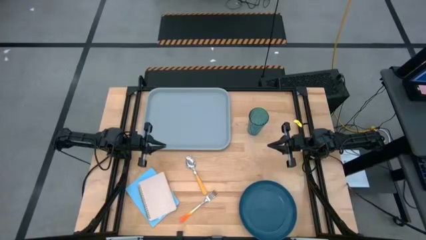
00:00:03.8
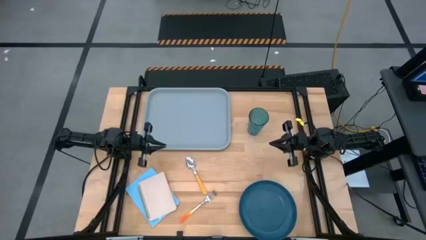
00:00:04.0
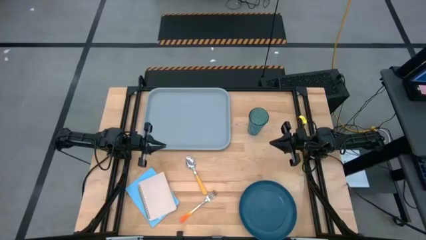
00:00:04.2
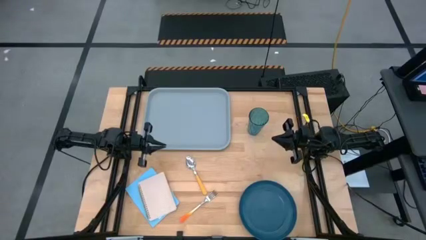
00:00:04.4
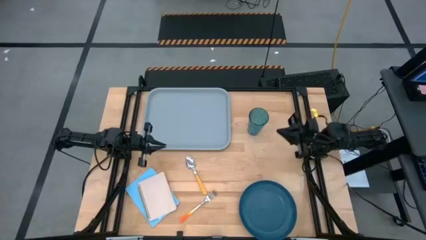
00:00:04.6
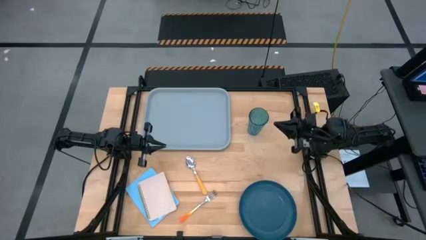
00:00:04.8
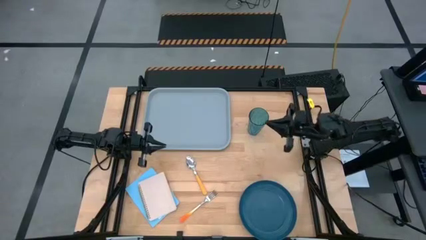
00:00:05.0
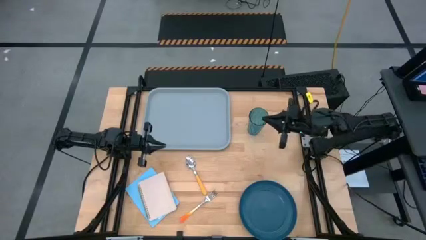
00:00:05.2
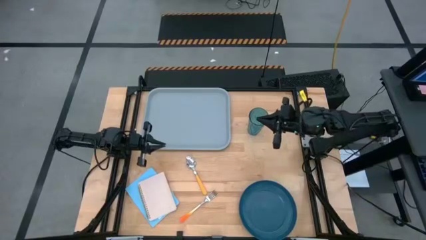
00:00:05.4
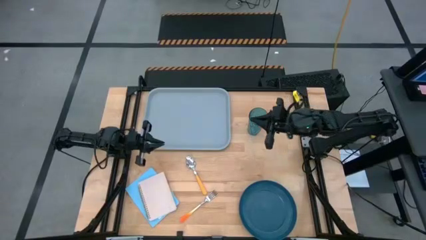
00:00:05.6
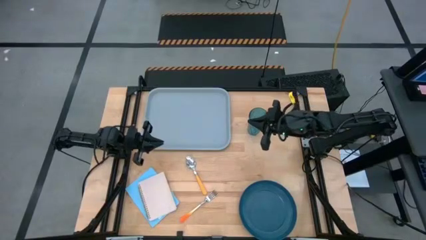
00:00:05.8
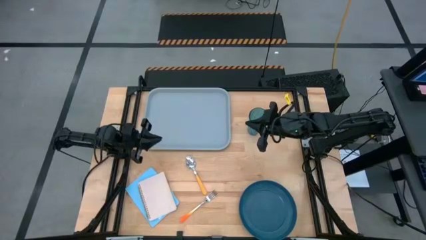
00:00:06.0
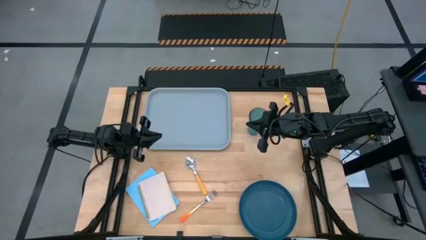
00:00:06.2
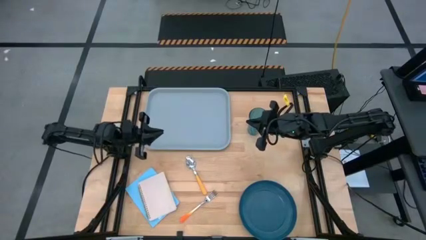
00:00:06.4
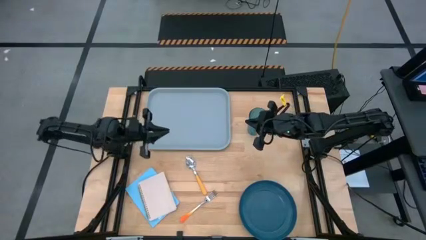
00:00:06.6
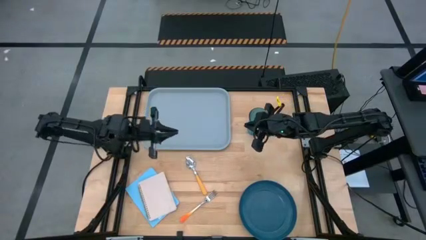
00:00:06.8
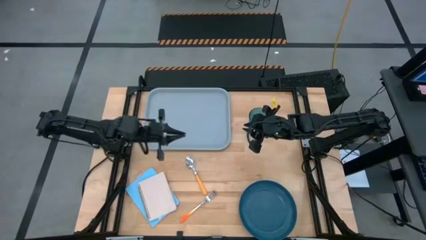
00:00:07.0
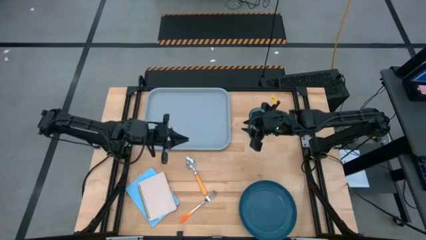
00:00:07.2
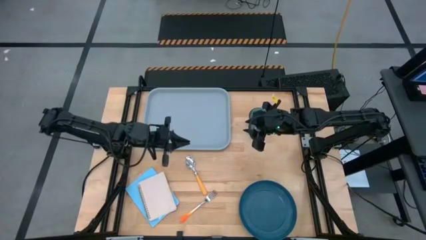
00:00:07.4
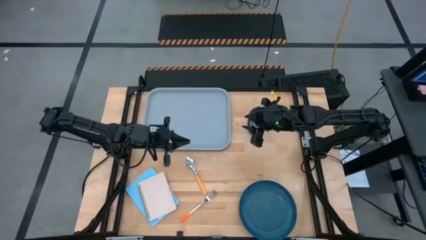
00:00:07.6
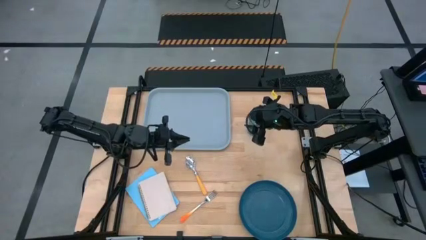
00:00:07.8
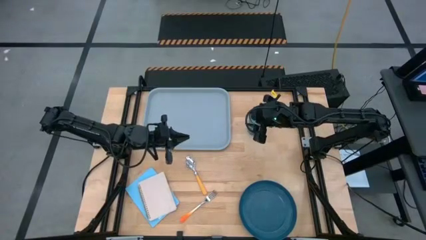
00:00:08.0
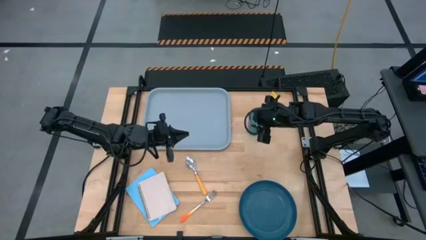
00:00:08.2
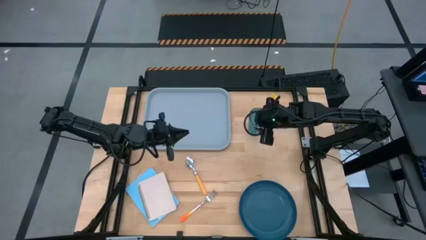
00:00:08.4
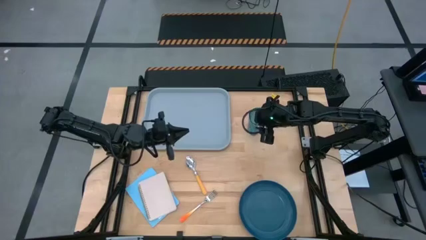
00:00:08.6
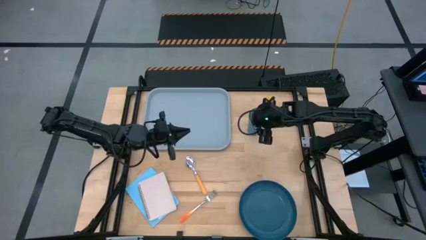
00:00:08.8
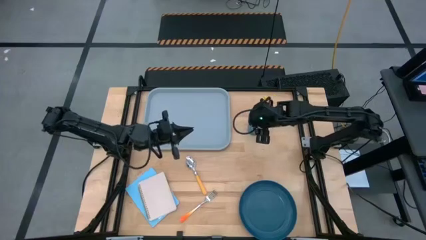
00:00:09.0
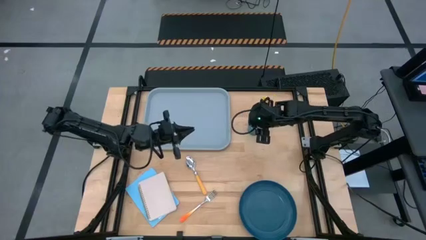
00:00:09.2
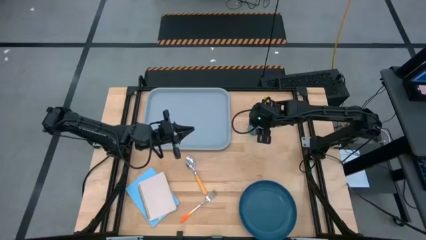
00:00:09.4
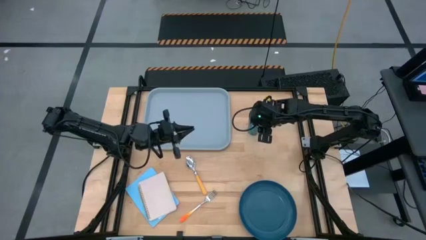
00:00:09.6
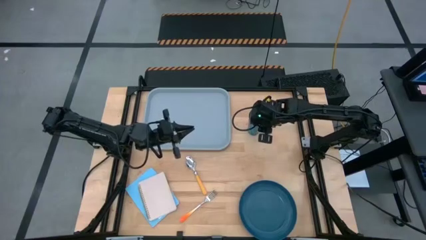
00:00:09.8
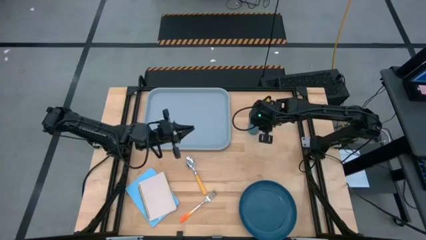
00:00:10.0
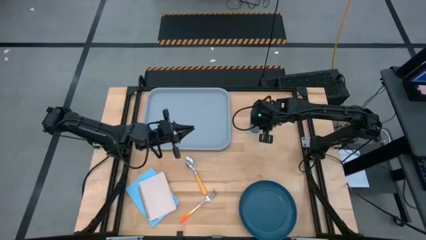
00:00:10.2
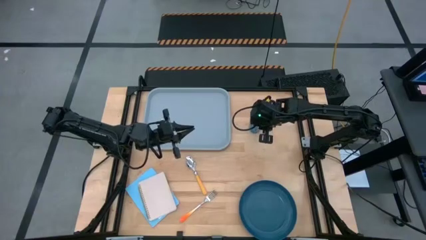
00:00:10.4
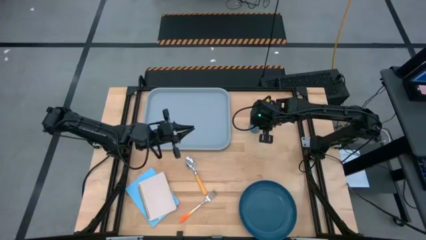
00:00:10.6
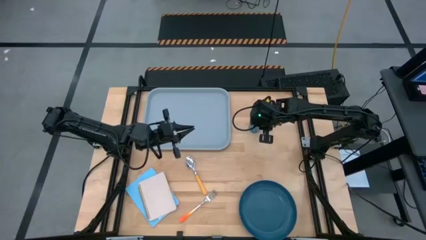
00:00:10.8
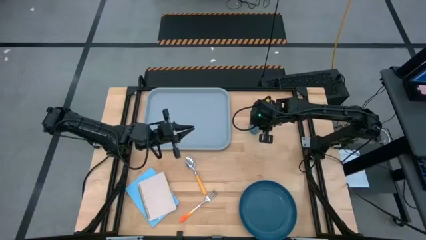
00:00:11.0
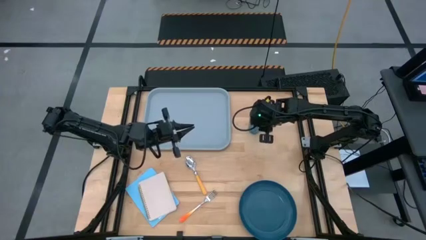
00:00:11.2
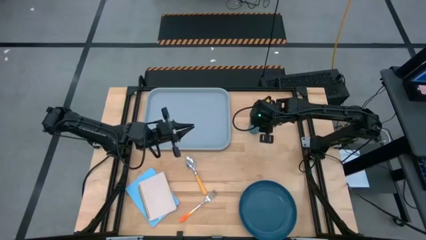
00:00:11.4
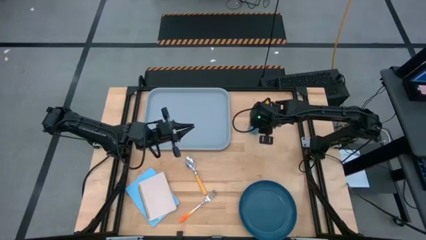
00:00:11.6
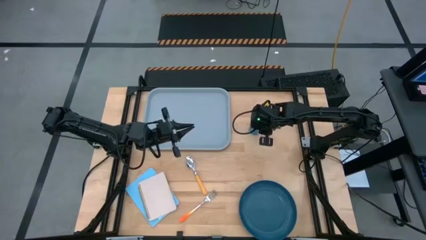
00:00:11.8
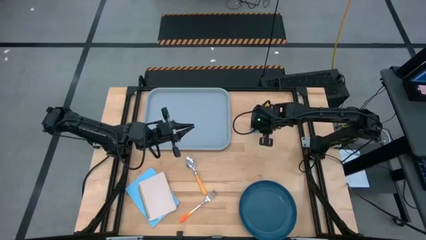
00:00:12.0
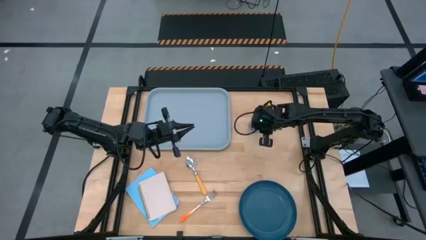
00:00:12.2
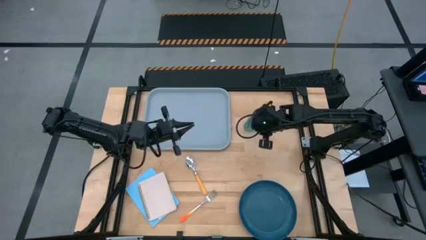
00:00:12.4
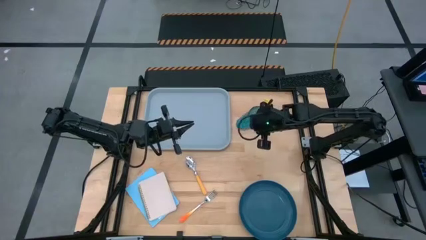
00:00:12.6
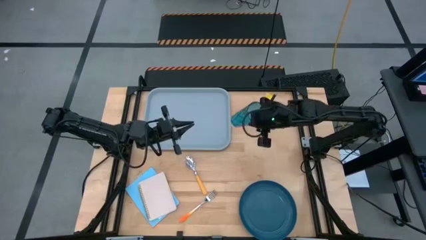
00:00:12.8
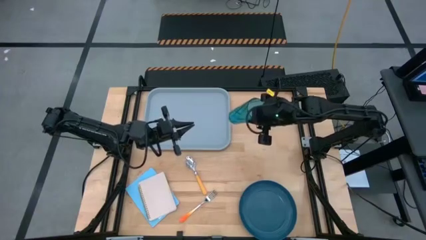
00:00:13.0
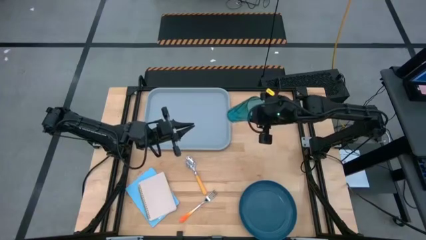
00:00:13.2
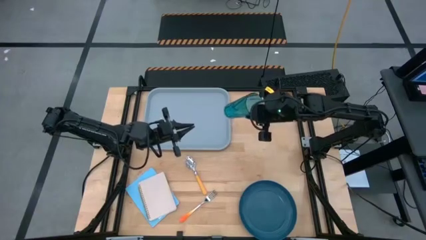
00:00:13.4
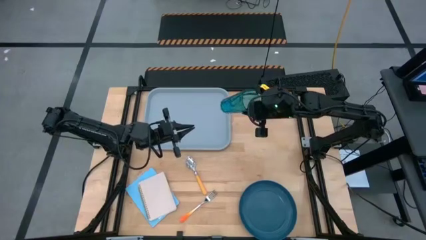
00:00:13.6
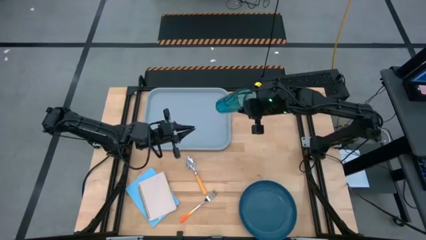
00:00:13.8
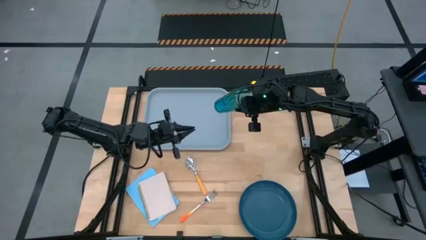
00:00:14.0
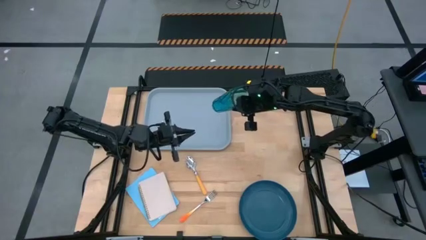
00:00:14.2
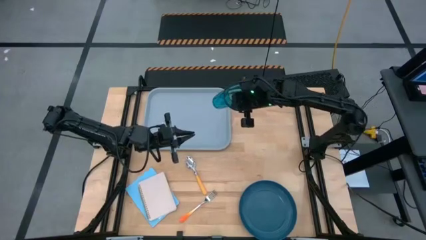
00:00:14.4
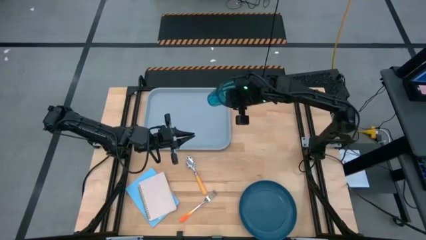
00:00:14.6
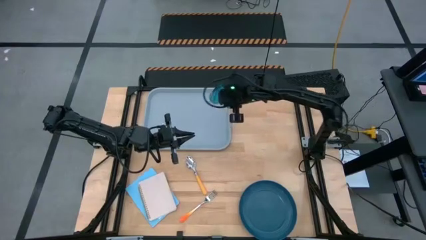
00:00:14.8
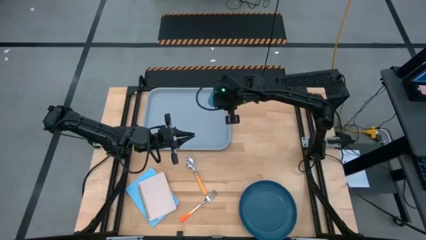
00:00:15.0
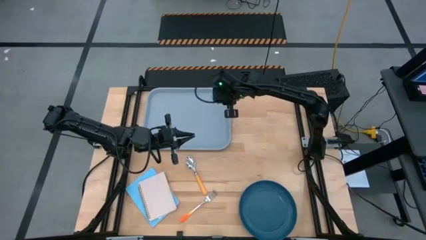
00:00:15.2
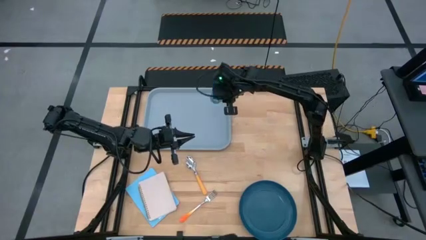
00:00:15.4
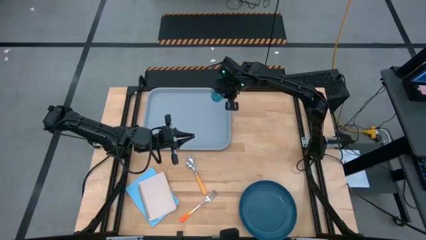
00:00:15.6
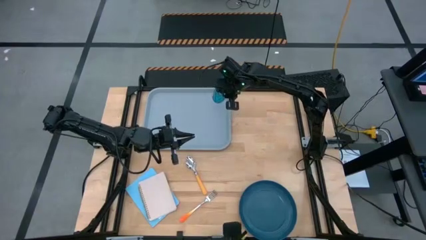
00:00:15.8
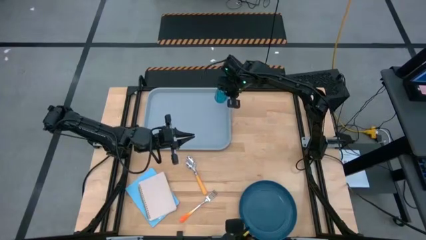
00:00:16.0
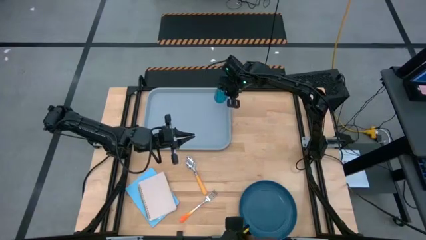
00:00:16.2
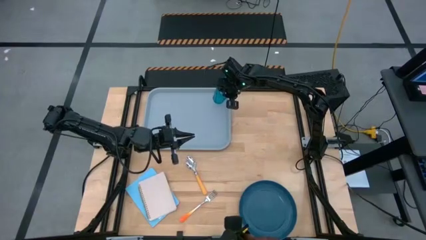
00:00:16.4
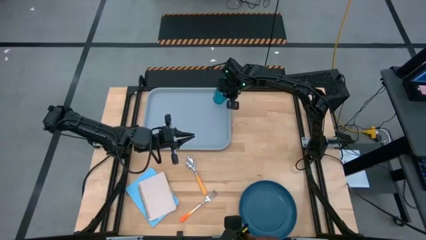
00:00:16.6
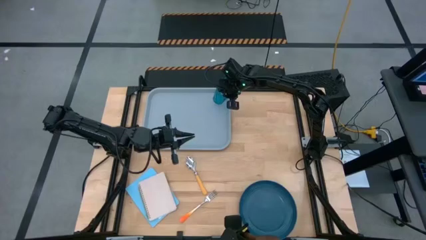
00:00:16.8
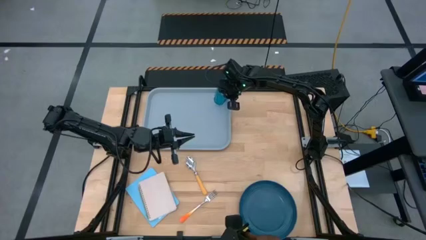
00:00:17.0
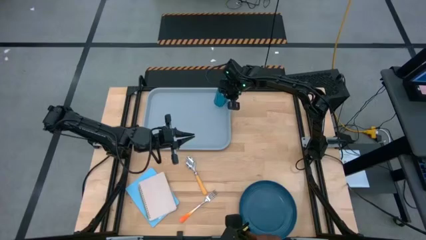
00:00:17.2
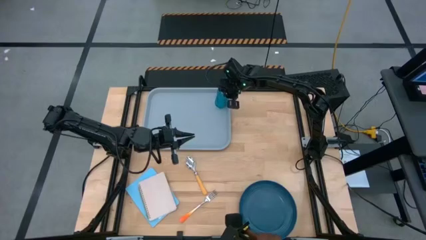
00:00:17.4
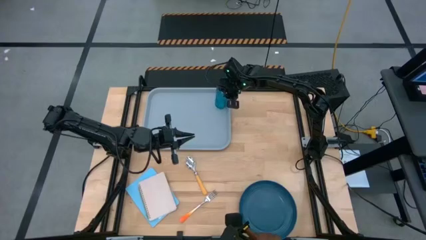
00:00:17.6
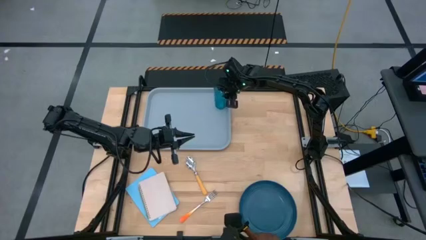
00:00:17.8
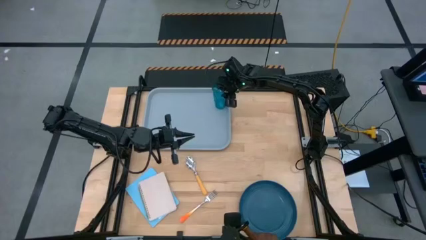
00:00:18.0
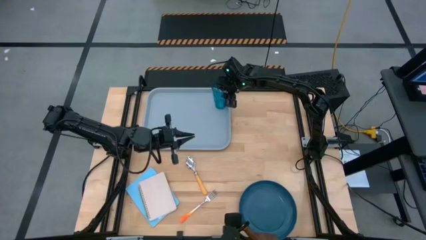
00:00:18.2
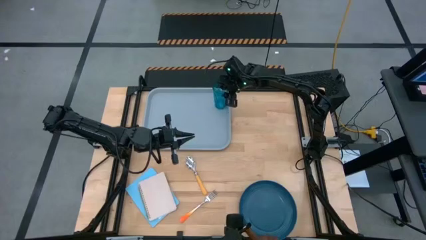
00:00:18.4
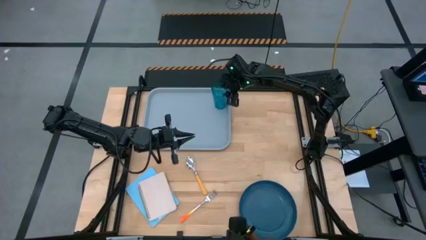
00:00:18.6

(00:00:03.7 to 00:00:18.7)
Task: Pick and place plate/cup/fork/spoon on tray
Put the blue cup on the top right of the light blue tray
